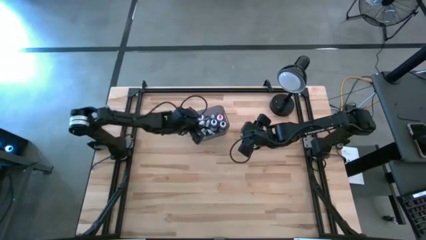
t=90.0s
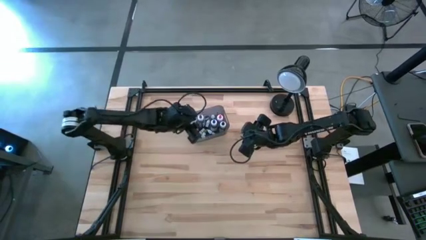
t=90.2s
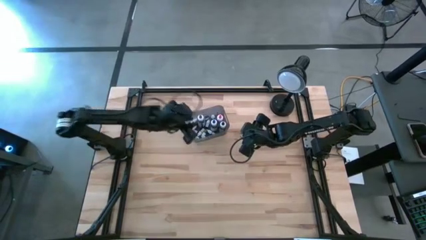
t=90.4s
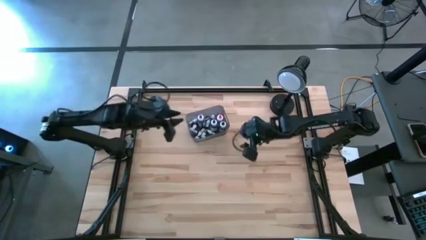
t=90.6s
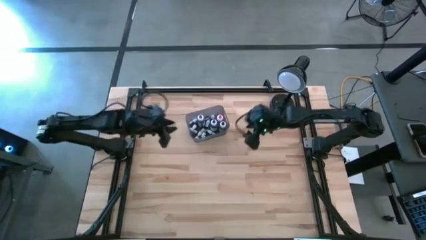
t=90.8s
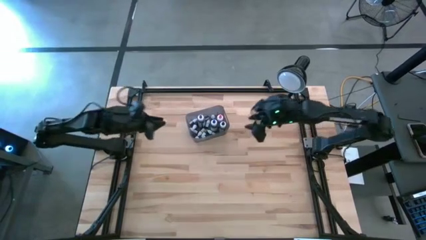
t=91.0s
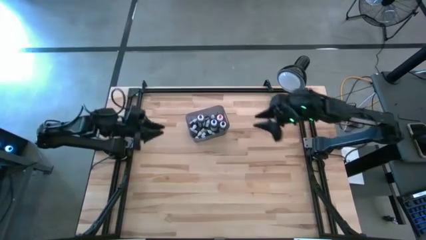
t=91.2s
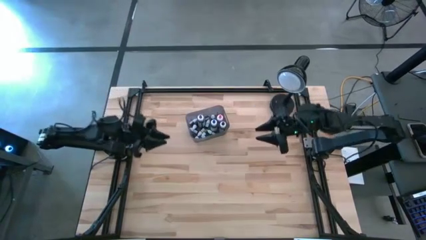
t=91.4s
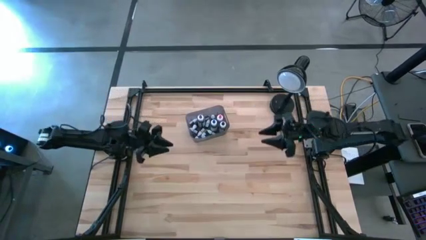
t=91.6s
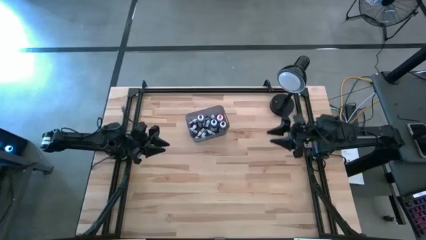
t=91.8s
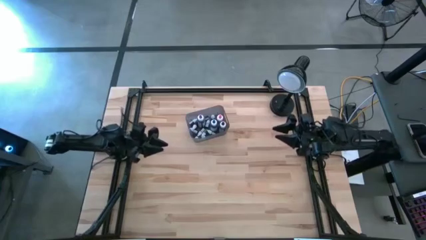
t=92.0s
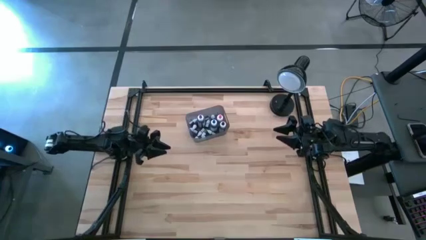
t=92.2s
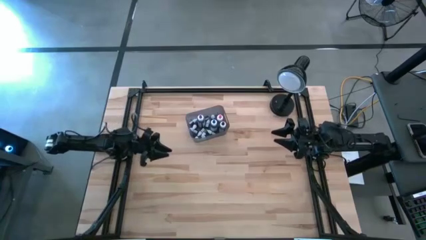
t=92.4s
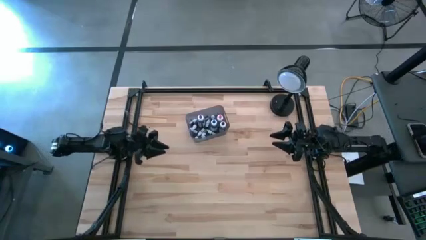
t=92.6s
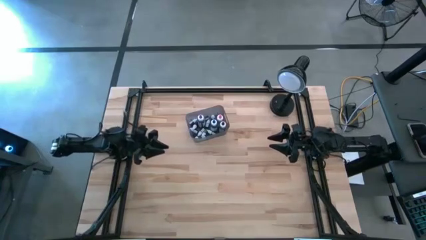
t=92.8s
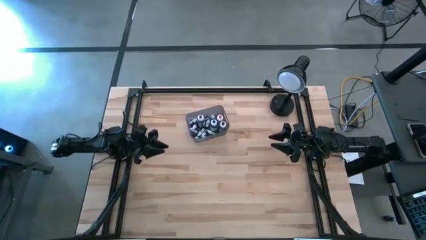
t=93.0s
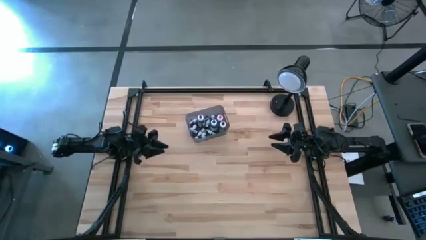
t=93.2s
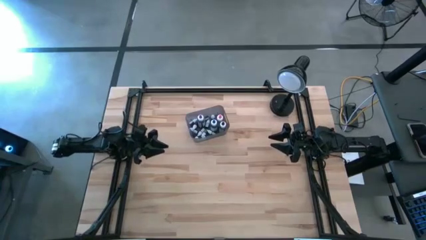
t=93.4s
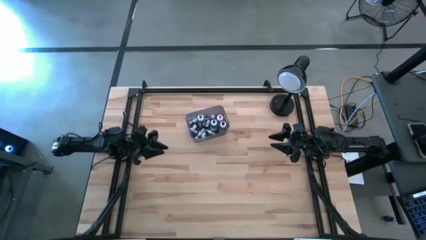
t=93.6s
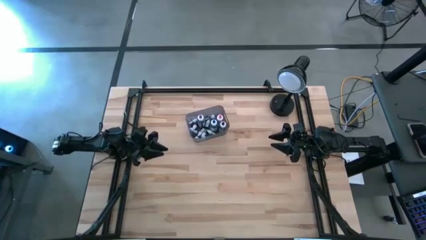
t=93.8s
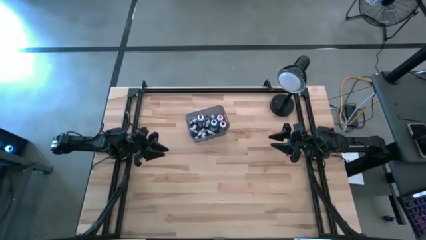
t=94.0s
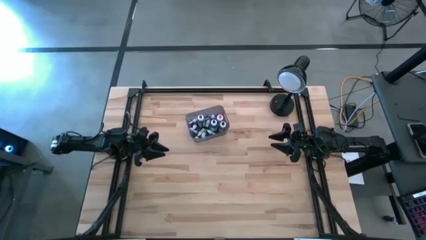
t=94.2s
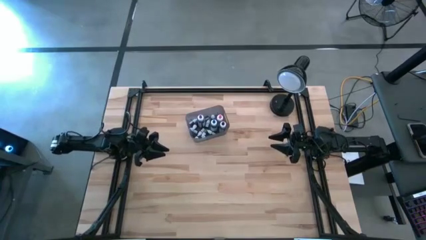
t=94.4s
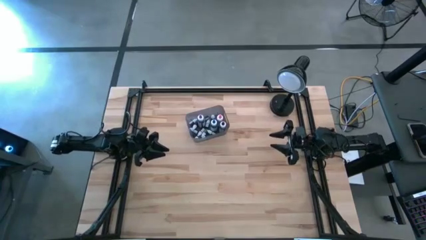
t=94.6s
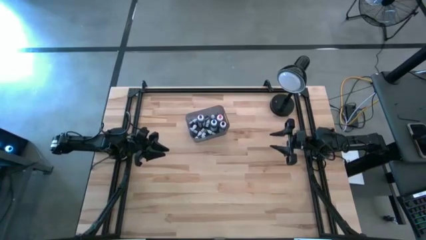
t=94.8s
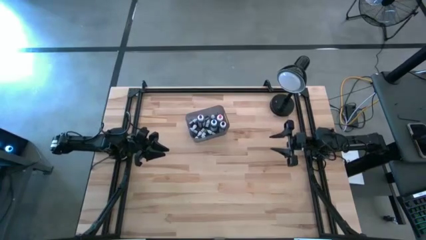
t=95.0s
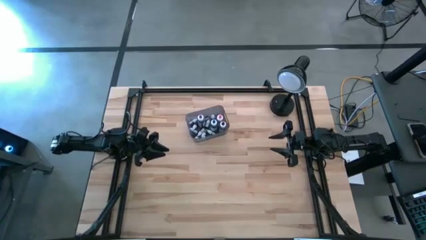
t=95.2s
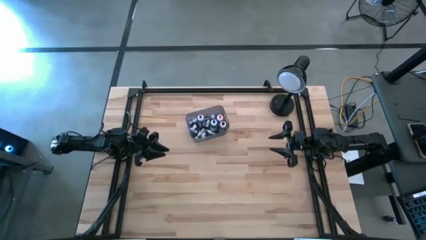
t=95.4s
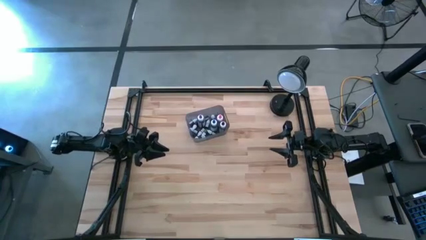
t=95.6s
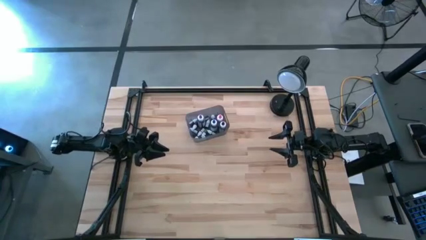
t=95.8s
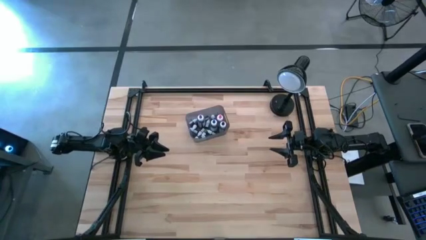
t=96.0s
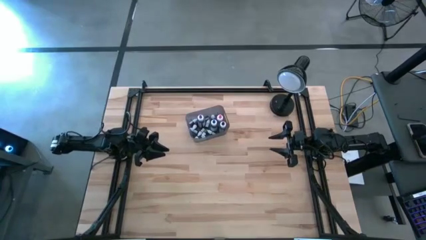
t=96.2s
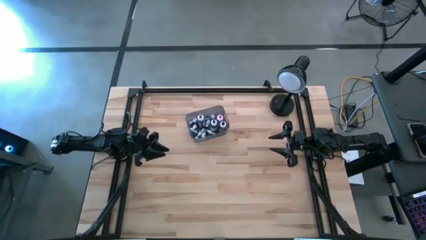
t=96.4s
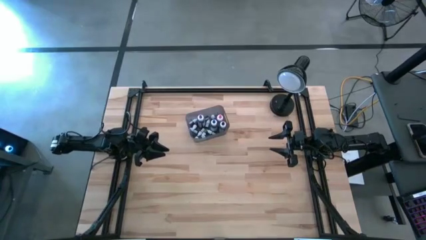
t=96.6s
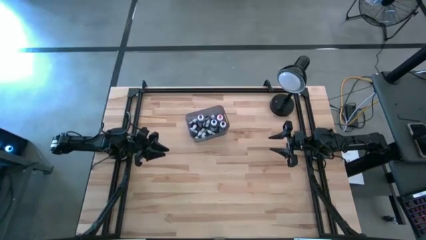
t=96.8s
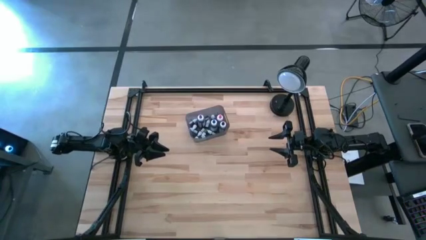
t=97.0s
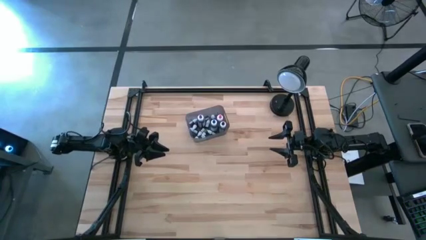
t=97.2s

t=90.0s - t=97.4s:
Task: Pick & Place food coloring
Return to Home Position

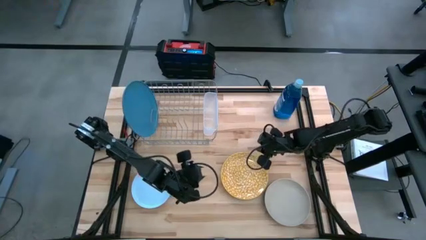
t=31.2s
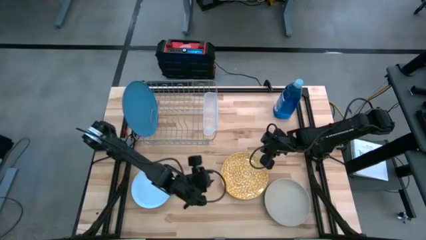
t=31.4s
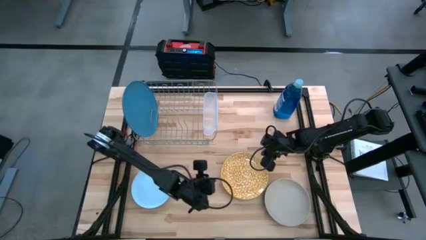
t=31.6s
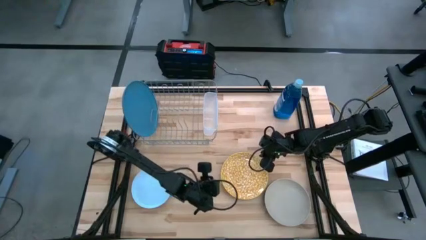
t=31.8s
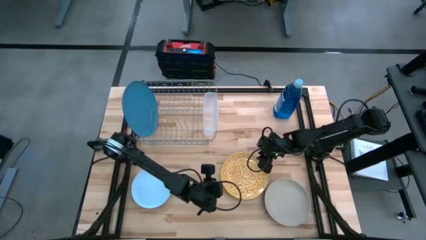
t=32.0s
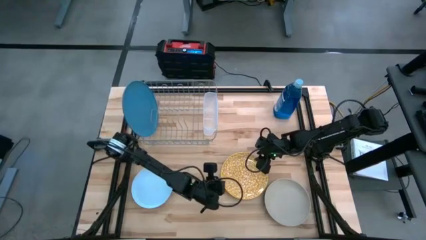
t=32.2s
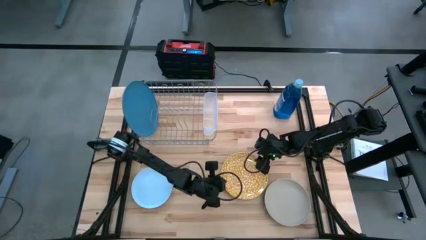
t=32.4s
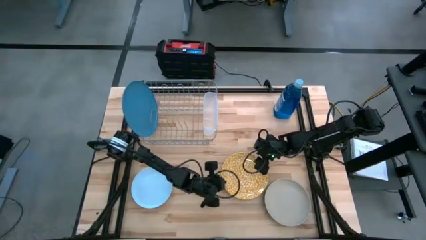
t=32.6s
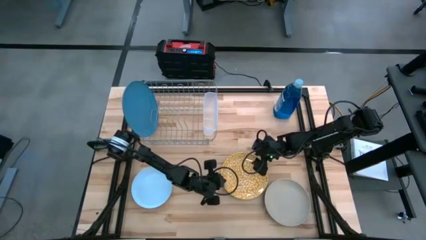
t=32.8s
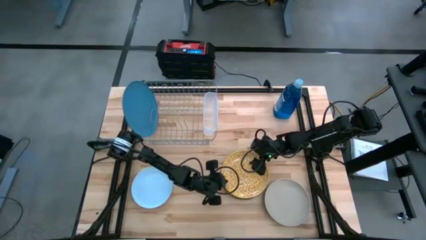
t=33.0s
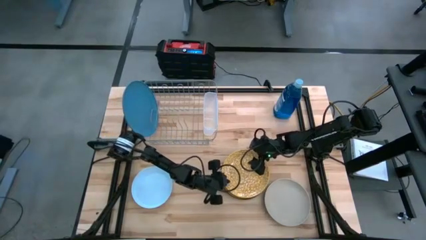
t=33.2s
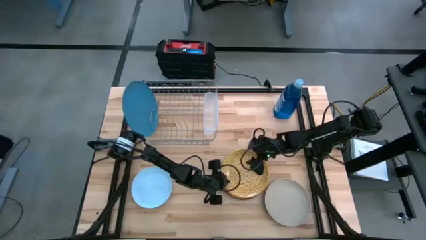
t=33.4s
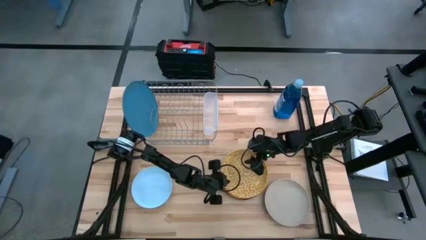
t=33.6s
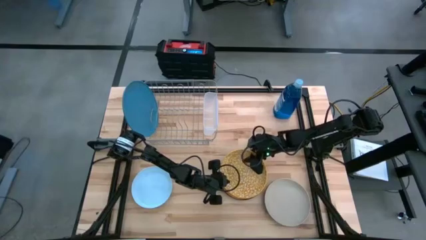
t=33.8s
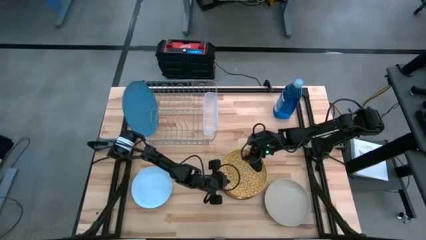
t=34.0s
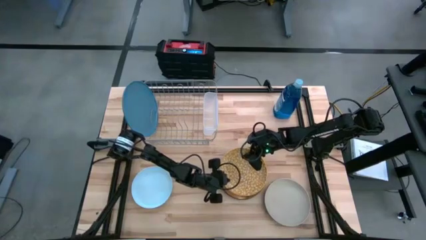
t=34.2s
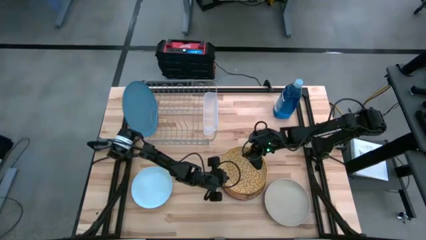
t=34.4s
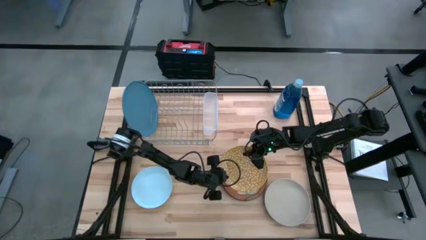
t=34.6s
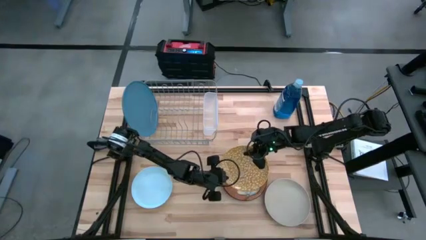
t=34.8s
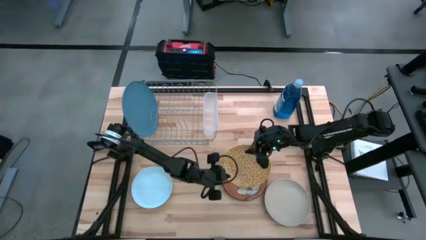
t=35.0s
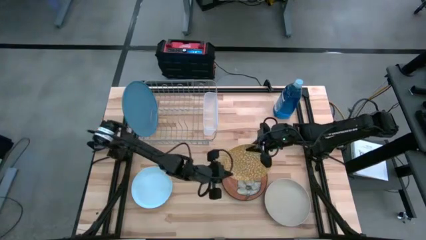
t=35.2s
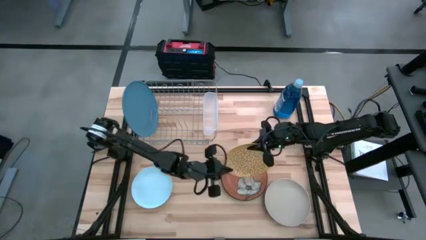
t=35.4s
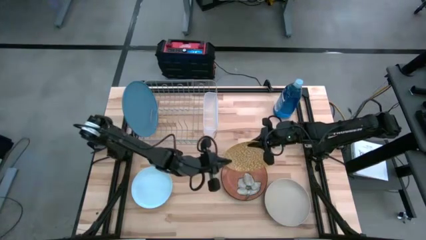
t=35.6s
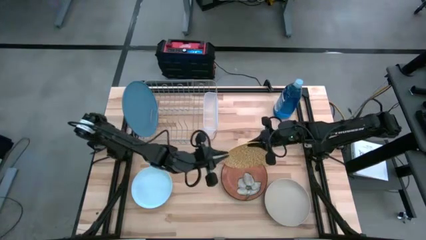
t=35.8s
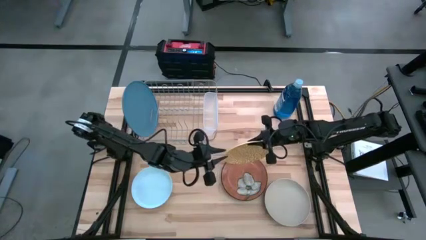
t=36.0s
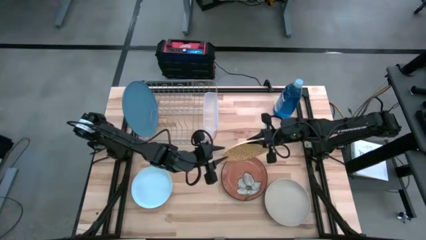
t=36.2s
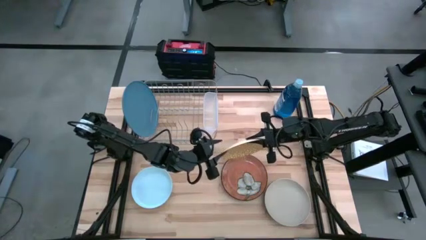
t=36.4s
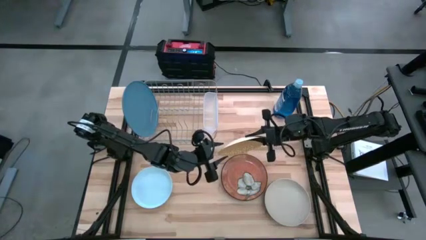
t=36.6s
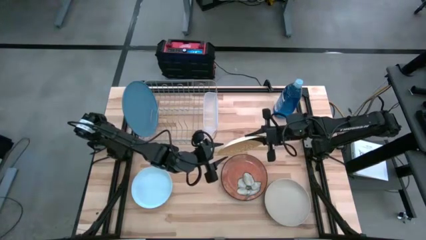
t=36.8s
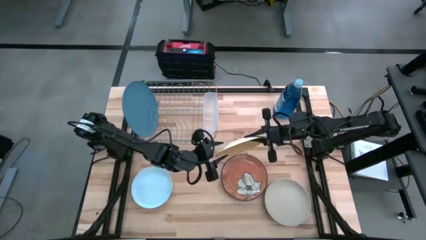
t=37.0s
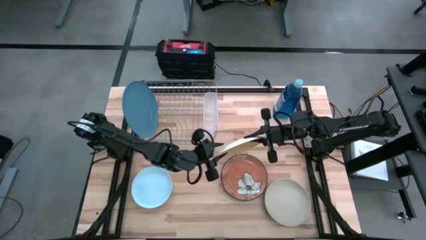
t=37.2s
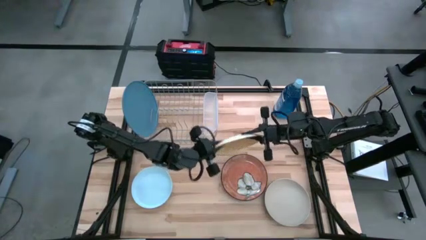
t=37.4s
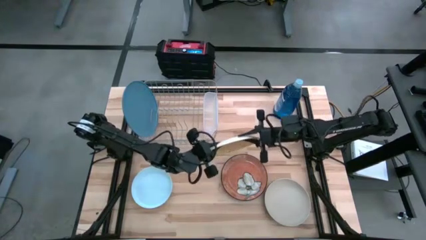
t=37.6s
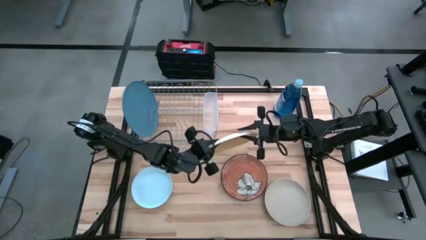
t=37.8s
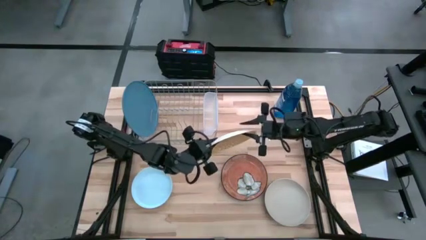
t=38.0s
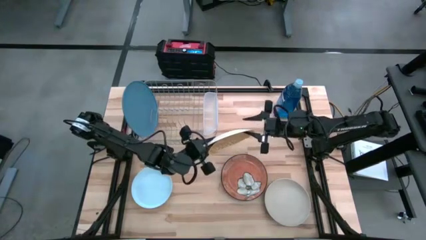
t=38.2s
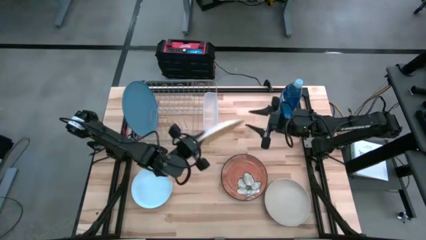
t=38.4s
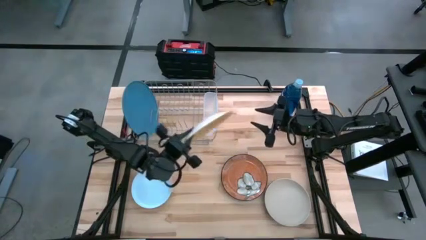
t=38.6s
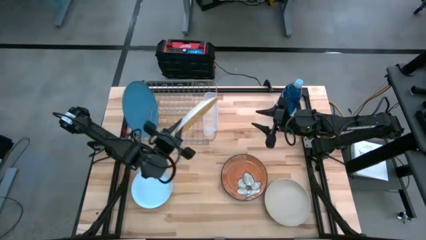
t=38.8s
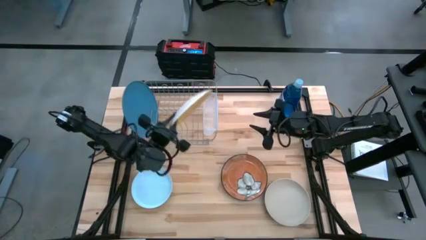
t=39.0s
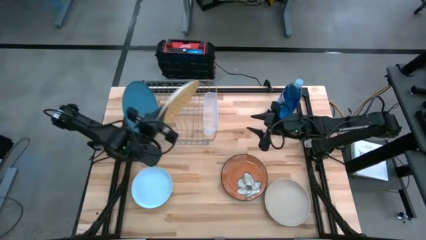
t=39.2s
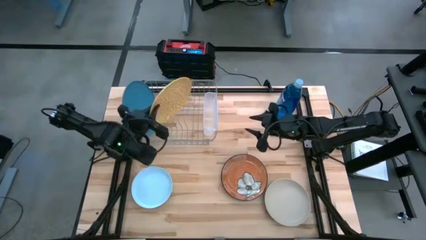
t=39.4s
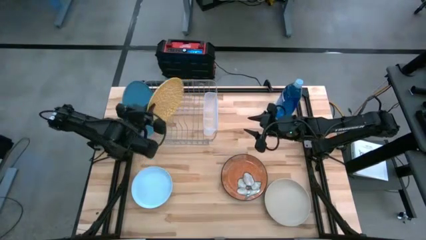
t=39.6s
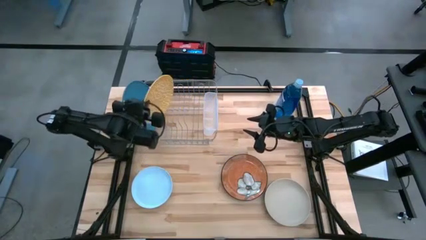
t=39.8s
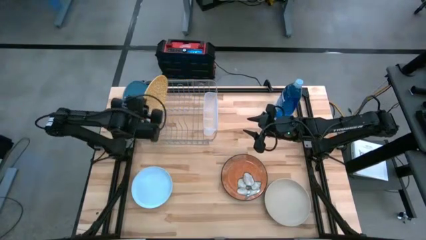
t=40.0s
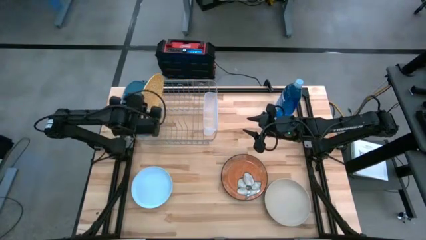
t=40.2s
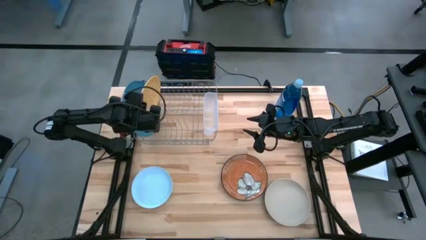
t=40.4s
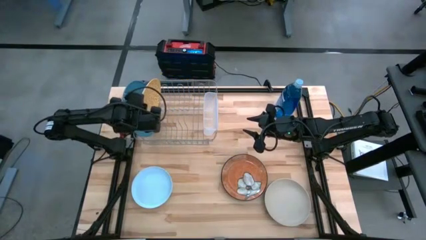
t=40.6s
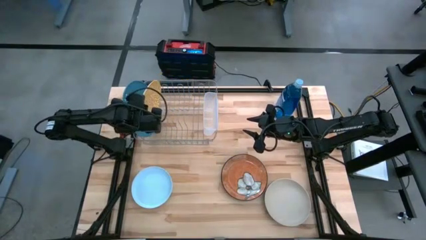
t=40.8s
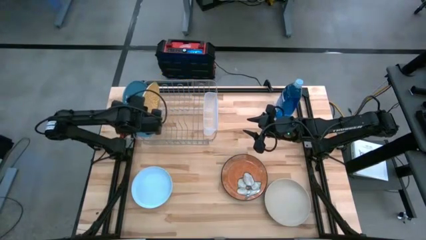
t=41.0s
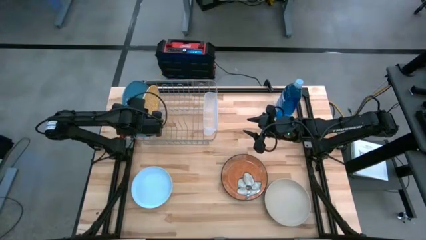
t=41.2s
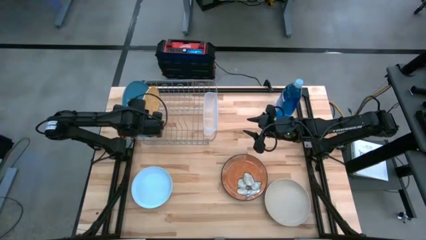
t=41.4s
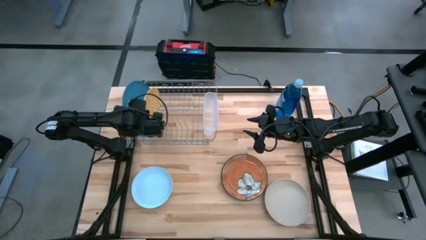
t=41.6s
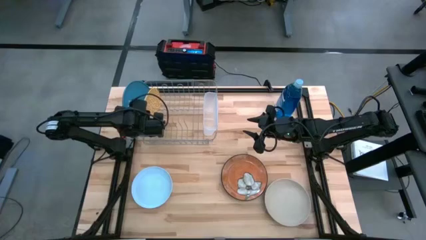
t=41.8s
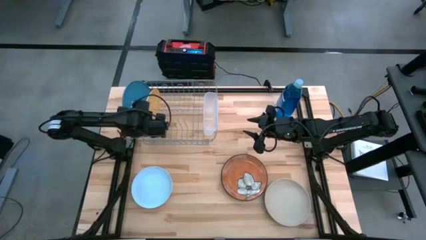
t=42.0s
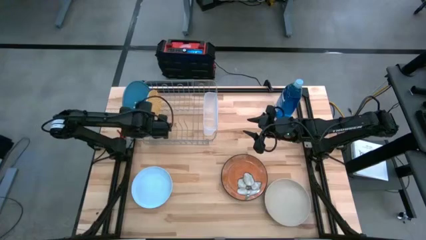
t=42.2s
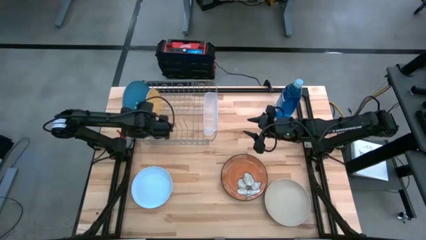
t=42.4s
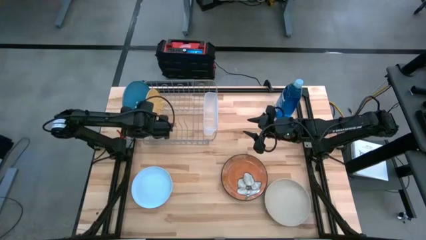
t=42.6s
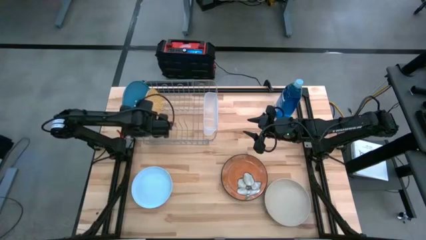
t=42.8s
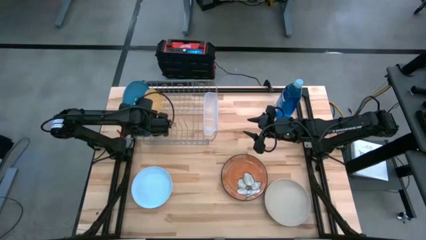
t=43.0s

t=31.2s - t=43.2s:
Task: Sort dishes
Put the yellow plate in the dish rack
